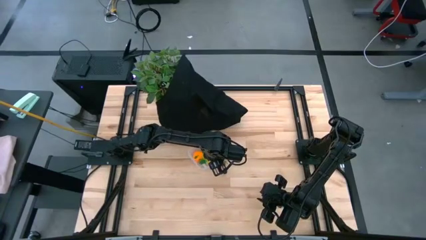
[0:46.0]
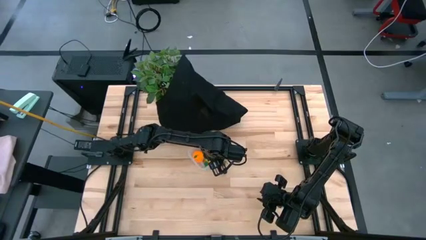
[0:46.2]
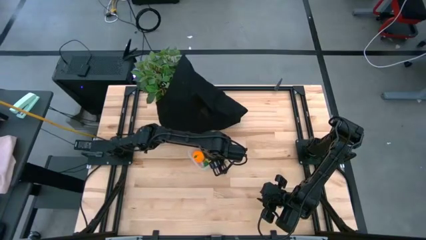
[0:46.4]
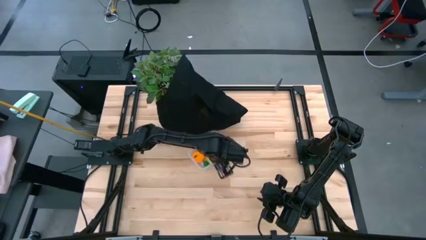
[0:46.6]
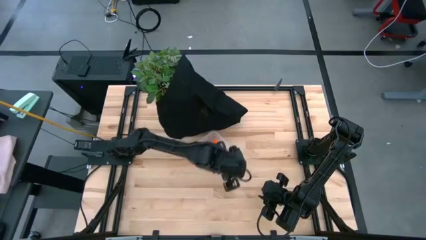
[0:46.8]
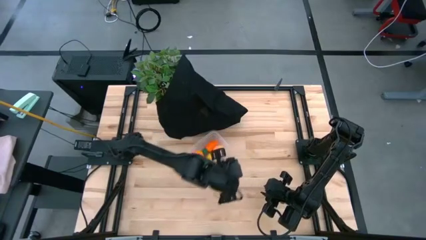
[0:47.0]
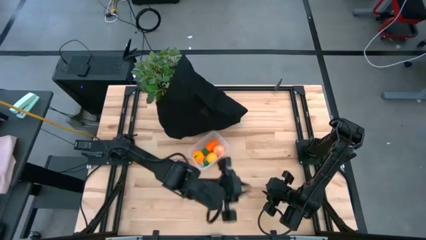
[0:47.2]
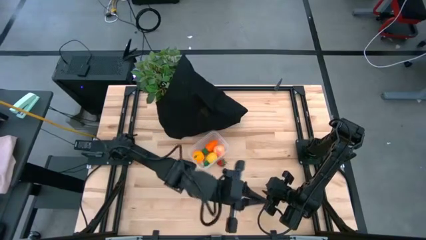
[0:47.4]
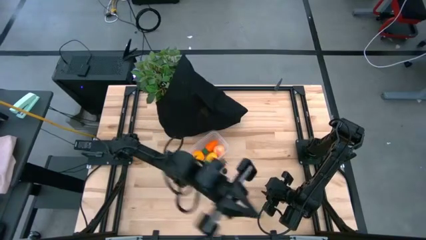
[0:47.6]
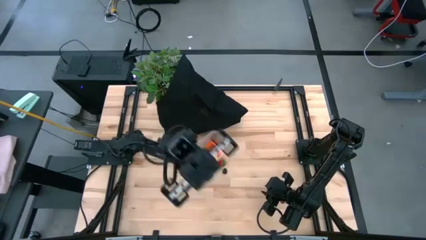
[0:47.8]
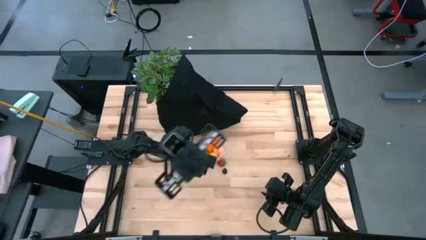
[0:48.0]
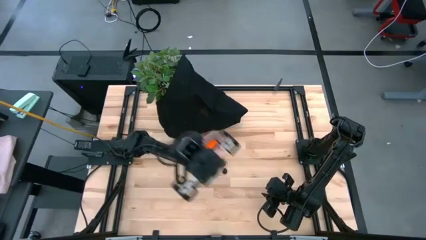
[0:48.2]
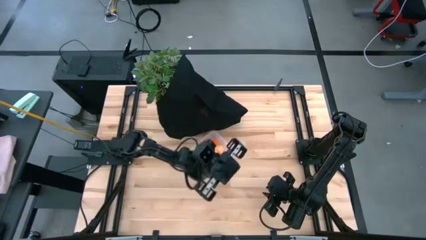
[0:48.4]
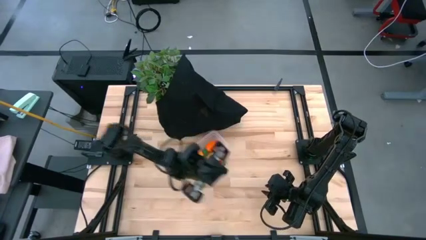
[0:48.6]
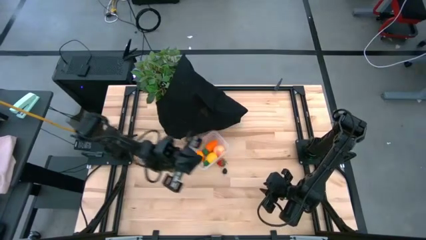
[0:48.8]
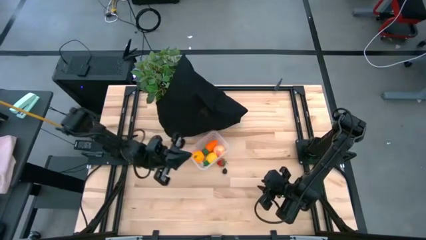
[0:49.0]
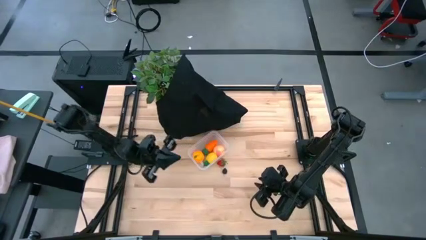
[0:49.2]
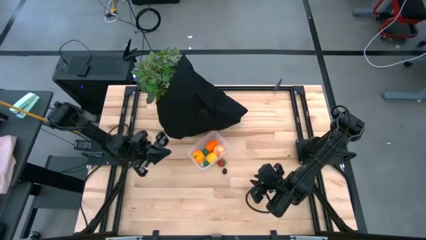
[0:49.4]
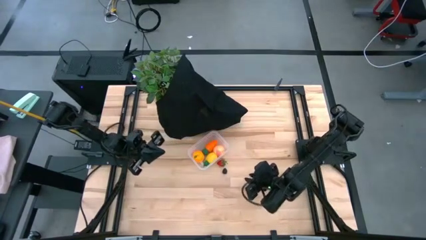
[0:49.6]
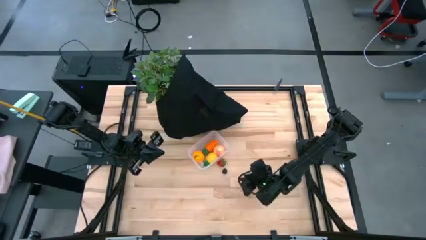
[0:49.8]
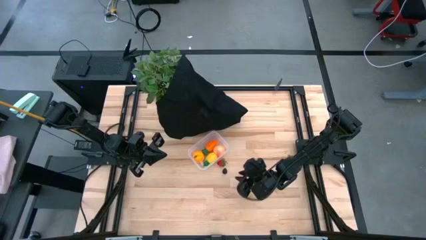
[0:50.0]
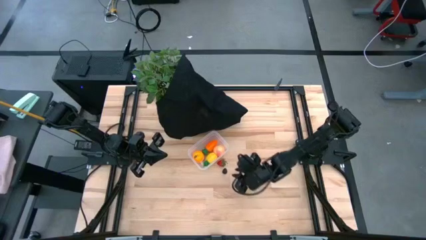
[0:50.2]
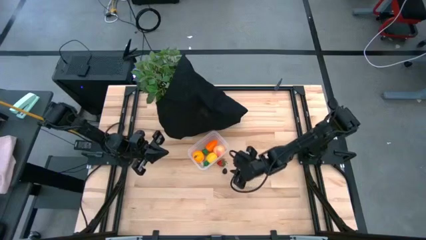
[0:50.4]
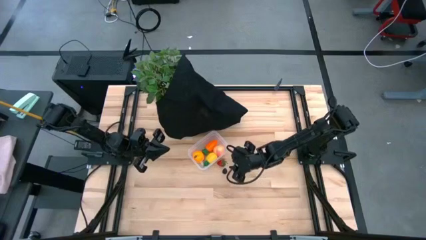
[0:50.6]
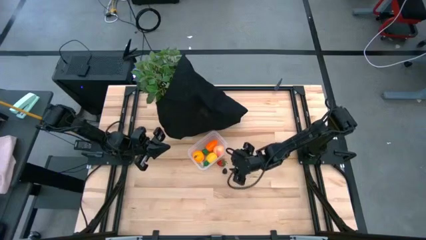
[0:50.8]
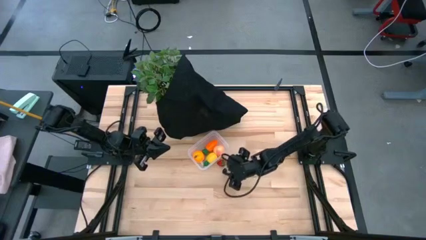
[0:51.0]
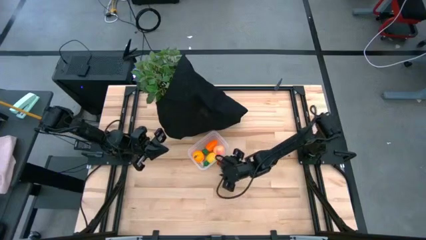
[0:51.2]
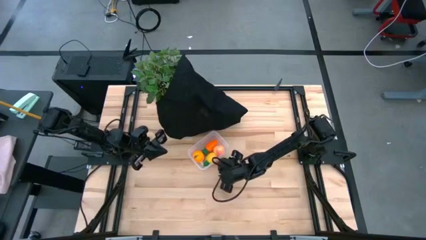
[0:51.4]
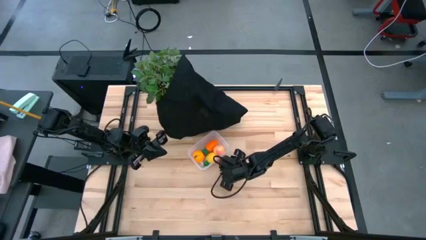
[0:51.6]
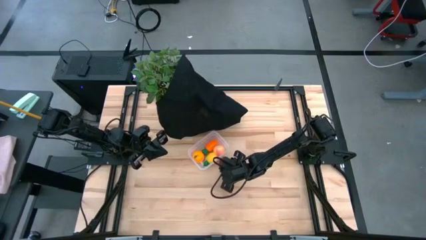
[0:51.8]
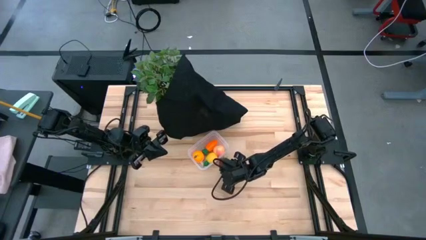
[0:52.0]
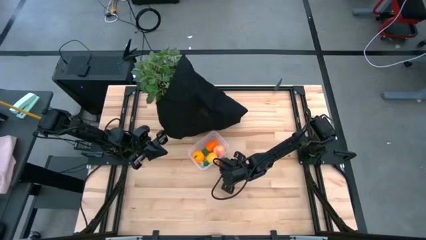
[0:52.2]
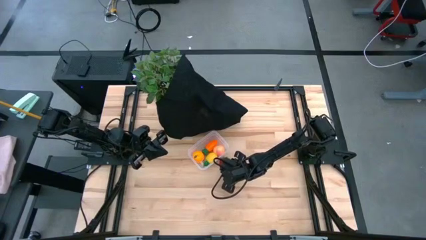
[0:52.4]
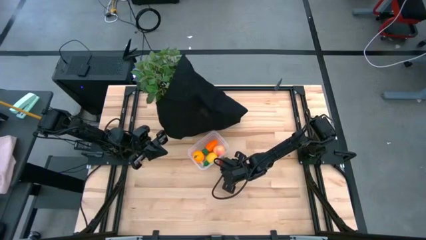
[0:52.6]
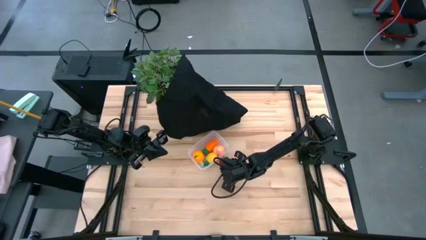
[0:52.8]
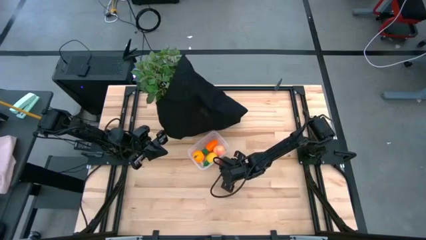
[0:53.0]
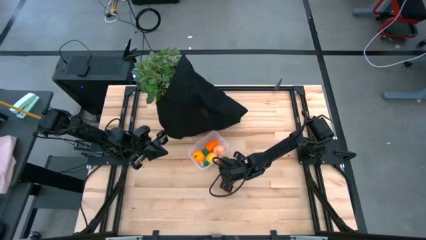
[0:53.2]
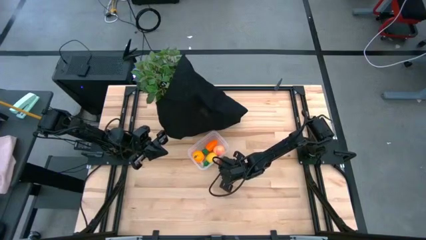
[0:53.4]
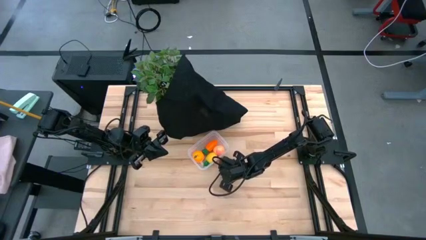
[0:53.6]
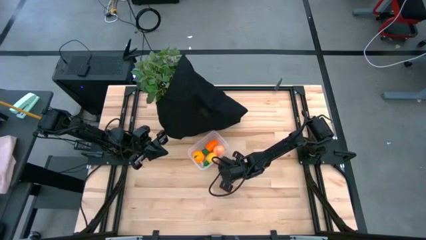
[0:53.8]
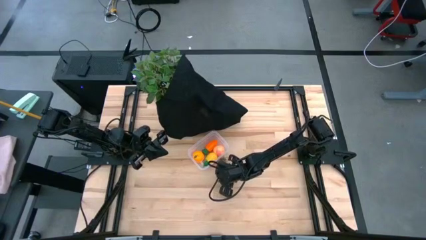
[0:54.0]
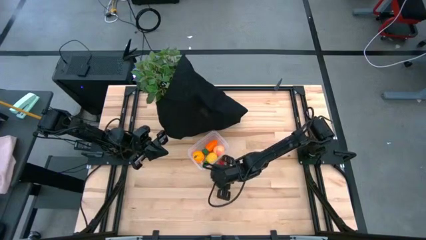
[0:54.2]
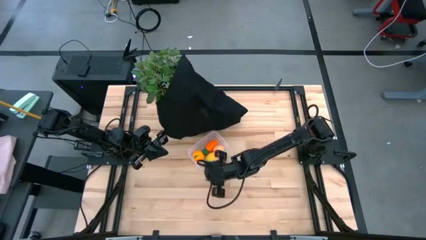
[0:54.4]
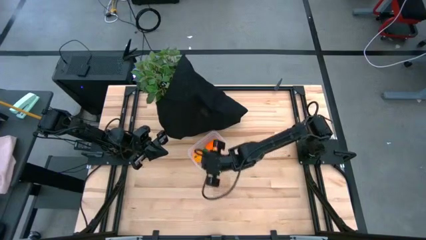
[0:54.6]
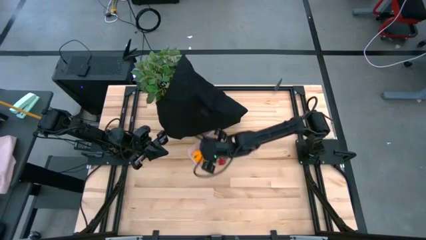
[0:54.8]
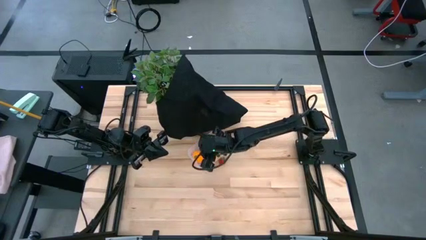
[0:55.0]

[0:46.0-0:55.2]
Task: Pick and placing Produce into tupperware
Put the blackberry into the transparent bin

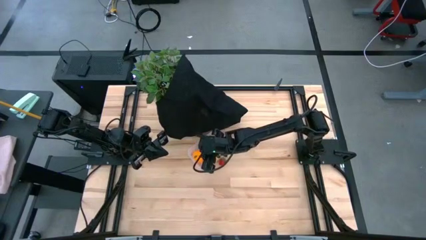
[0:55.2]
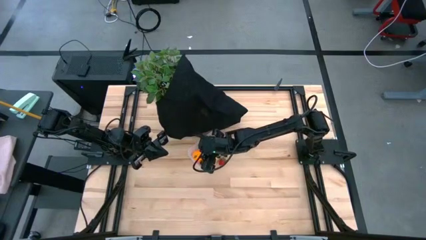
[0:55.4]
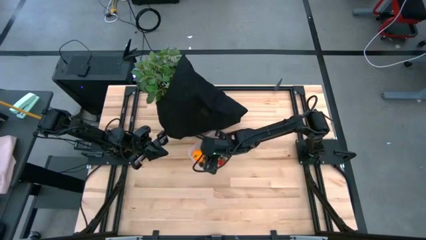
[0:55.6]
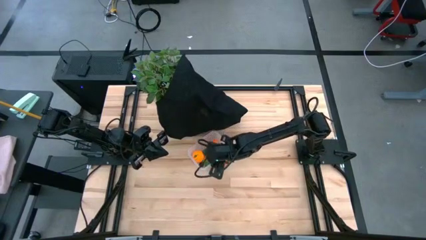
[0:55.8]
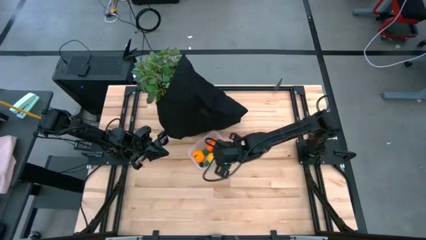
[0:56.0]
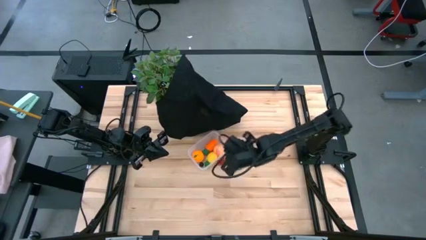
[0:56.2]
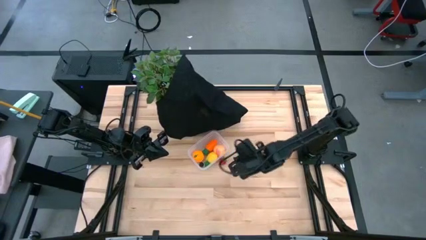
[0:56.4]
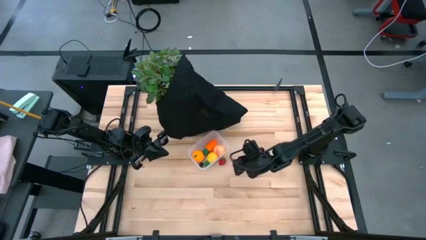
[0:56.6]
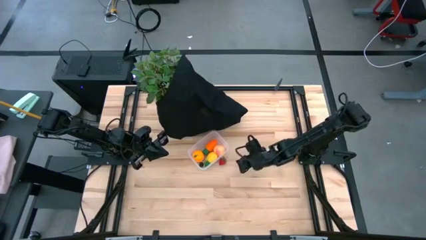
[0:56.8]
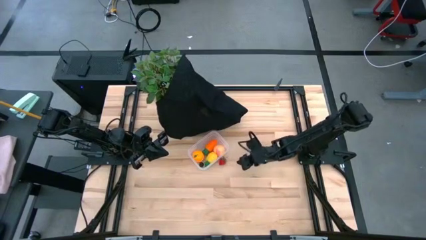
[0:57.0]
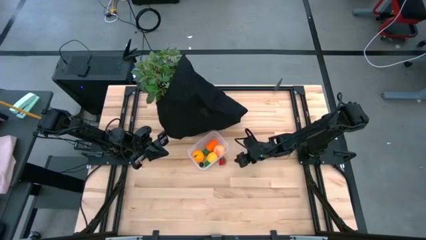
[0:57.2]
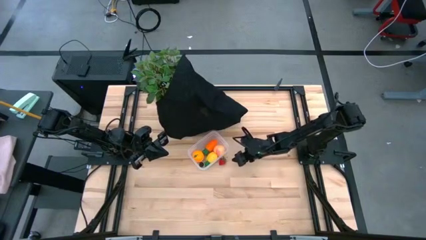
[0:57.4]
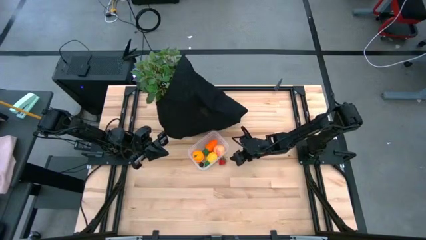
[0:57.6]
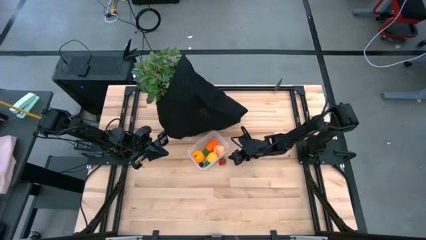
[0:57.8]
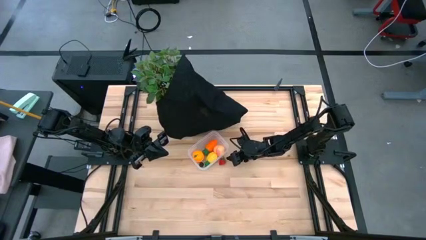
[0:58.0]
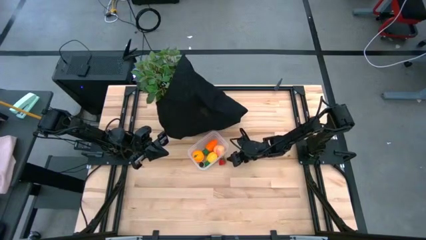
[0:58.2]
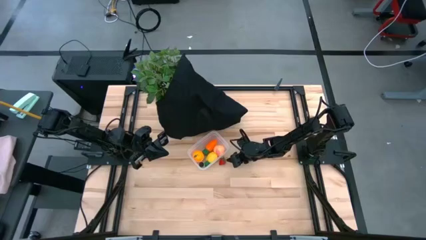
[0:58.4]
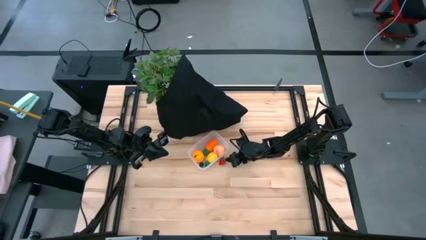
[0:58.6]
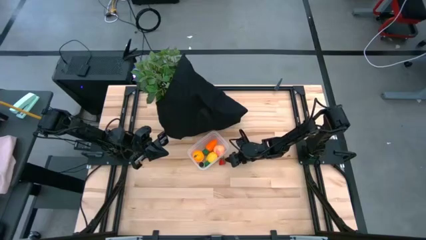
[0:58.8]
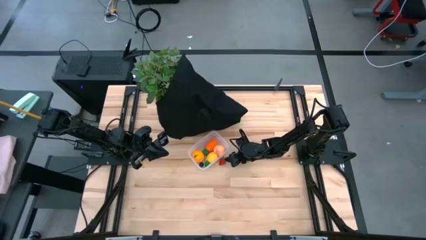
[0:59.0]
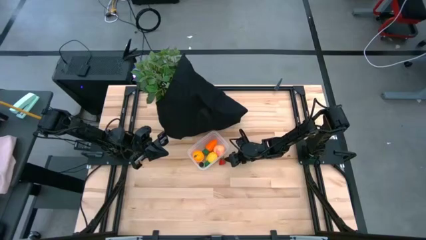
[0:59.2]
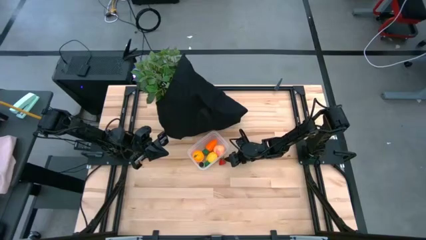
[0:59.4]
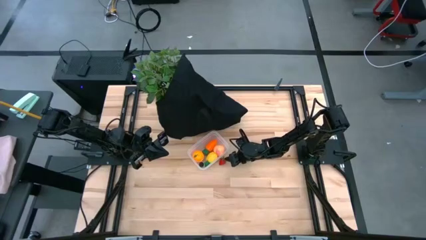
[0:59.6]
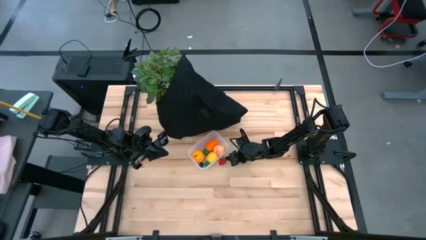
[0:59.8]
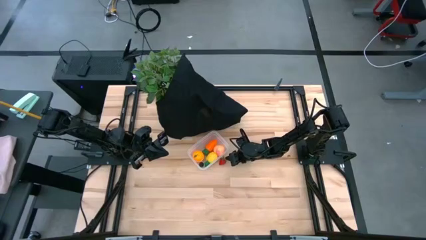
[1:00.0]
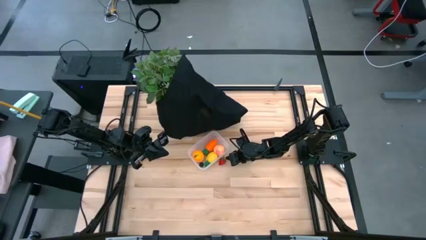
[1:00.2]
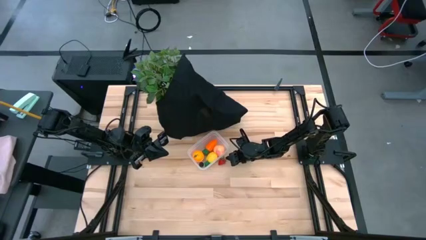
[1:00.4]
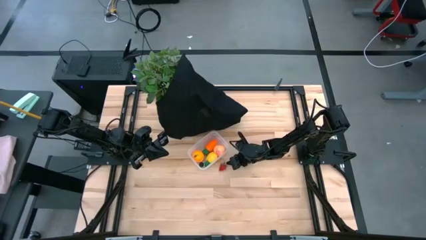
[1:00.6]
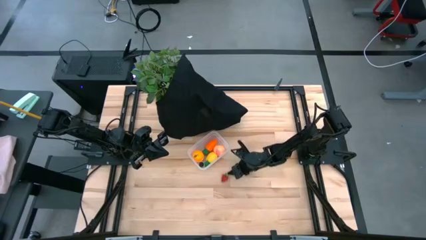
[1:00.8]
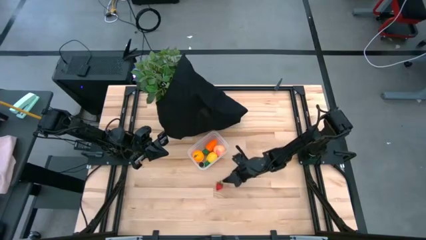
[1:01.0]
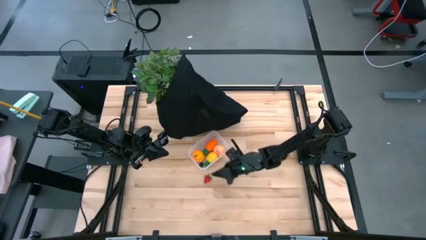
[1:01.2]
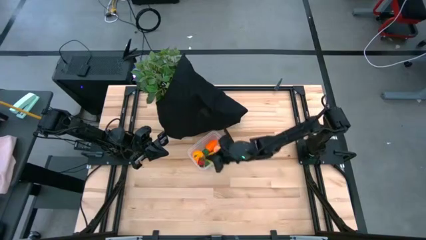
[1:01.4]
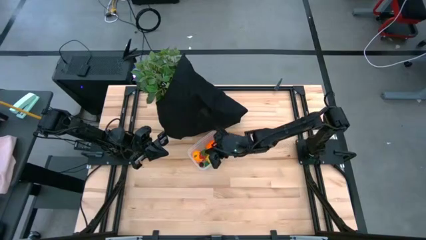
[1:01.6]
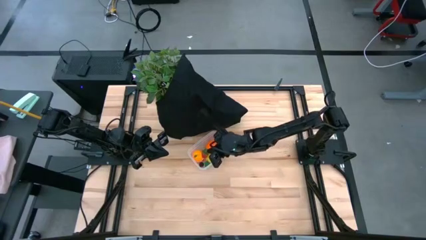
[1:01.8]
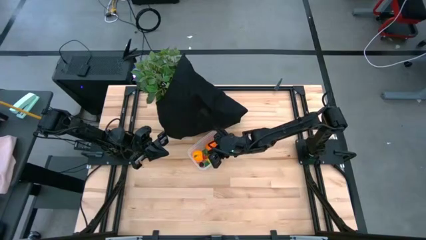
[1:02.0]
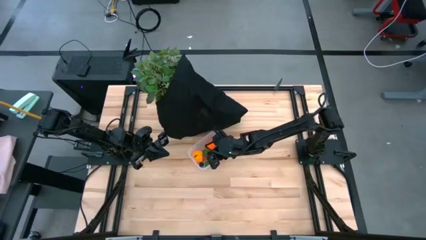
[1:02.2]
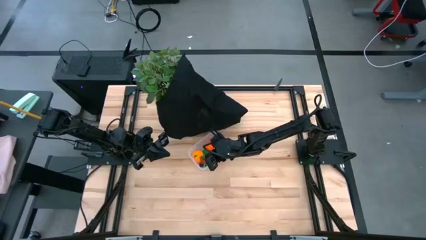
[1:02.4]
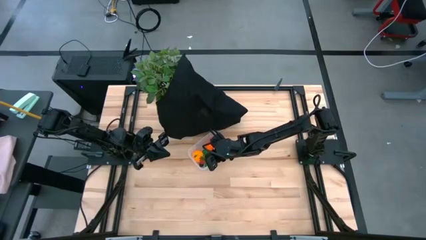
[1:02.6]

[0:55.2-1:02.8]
Put the red strawberry into the transparent bin
